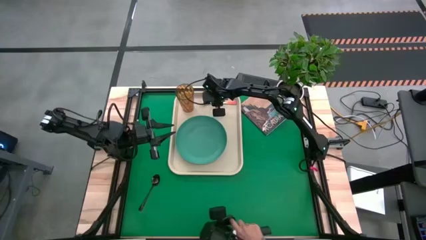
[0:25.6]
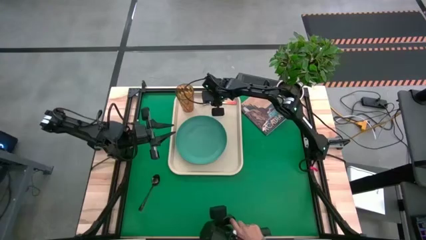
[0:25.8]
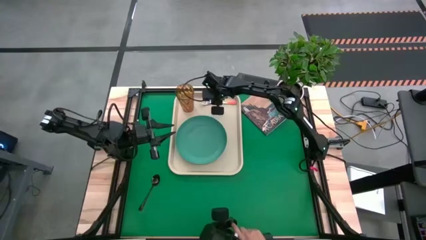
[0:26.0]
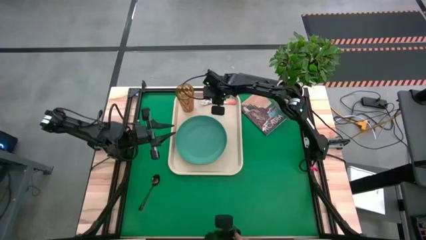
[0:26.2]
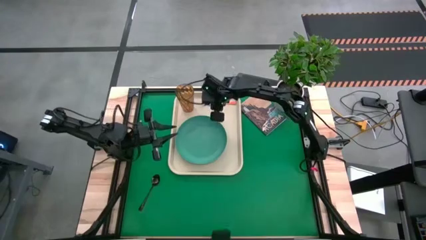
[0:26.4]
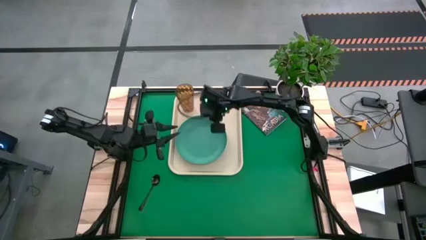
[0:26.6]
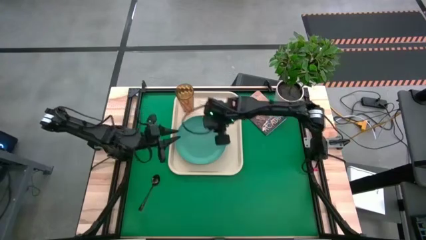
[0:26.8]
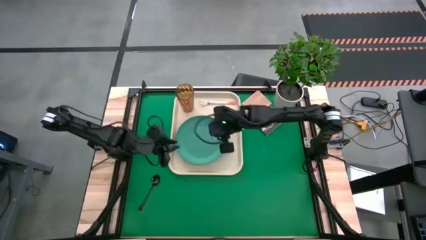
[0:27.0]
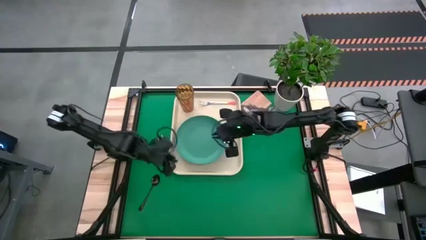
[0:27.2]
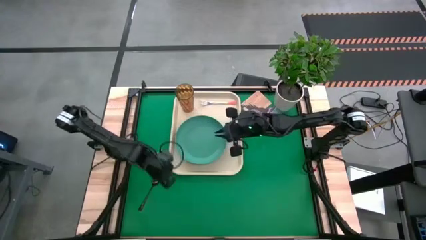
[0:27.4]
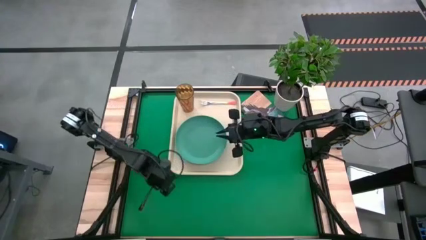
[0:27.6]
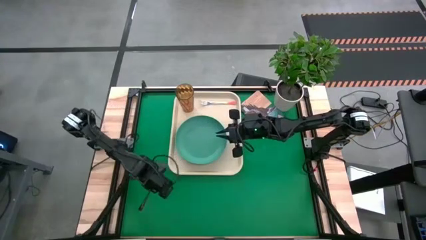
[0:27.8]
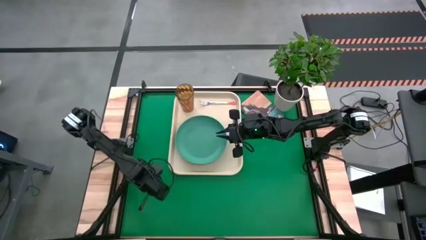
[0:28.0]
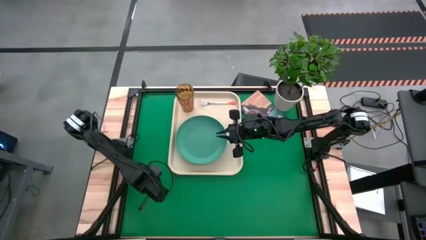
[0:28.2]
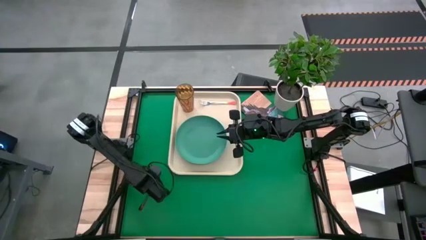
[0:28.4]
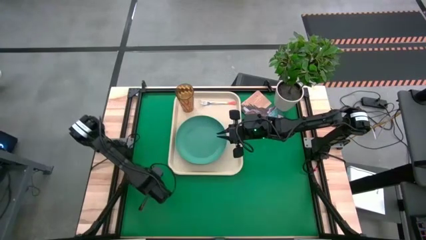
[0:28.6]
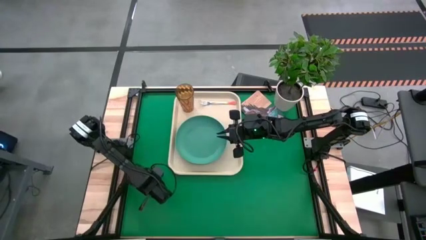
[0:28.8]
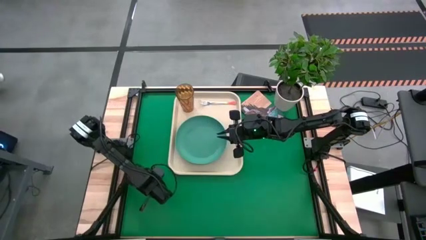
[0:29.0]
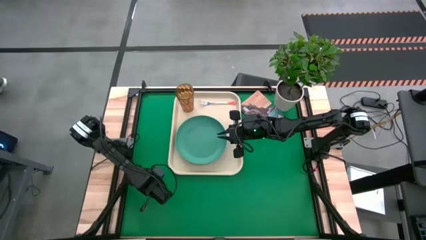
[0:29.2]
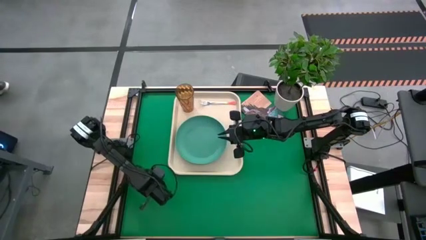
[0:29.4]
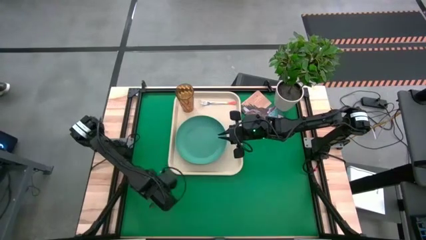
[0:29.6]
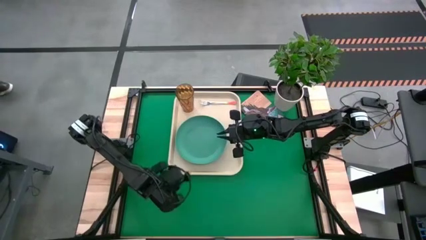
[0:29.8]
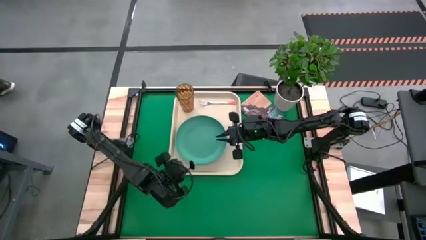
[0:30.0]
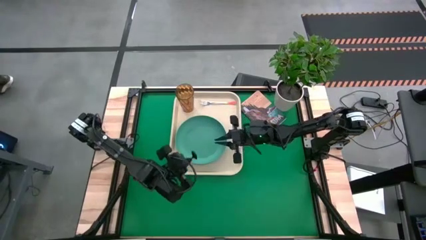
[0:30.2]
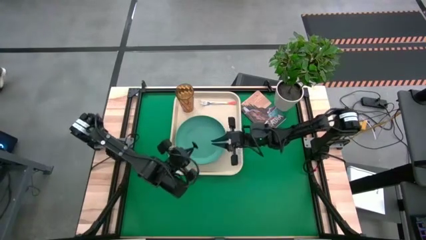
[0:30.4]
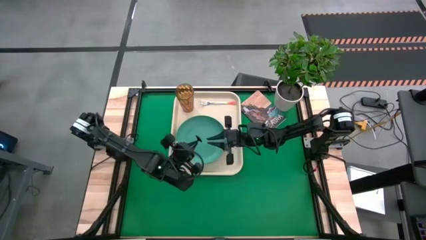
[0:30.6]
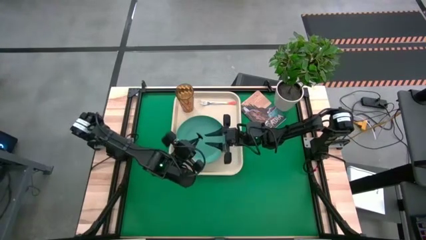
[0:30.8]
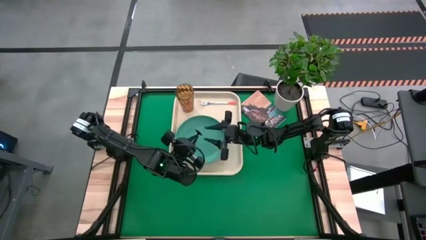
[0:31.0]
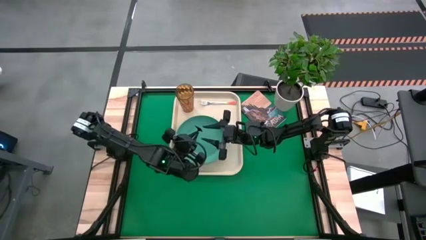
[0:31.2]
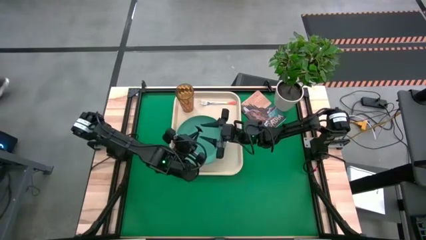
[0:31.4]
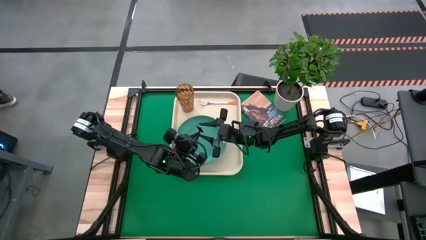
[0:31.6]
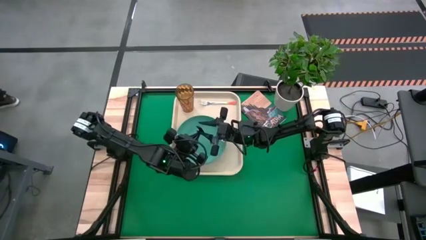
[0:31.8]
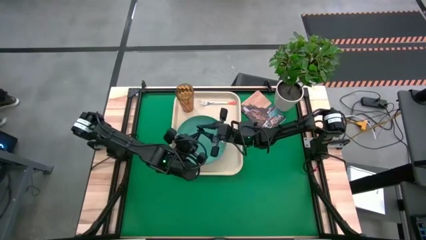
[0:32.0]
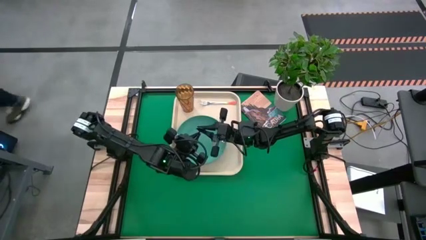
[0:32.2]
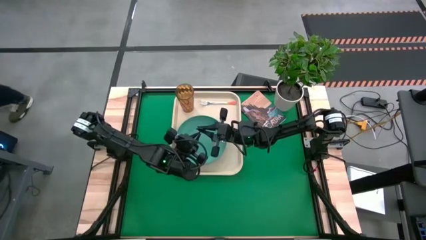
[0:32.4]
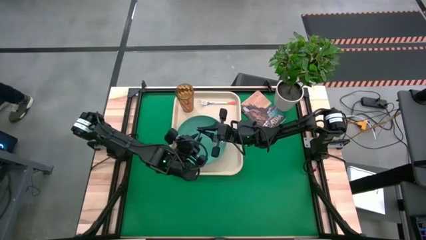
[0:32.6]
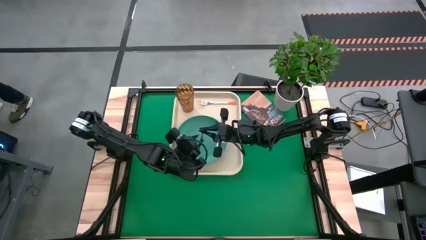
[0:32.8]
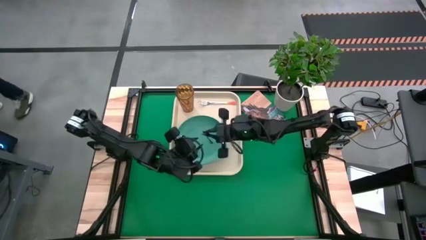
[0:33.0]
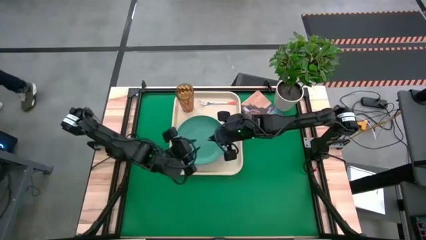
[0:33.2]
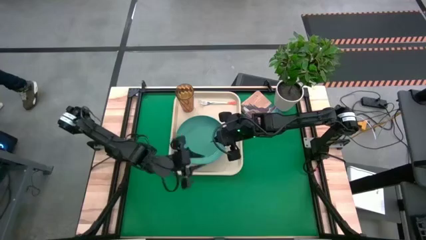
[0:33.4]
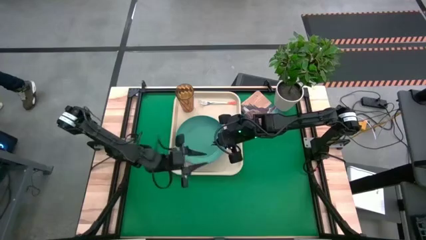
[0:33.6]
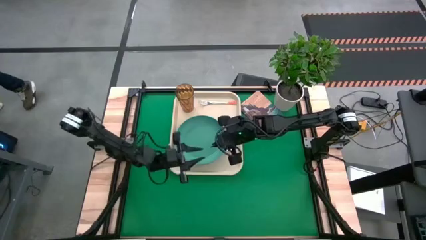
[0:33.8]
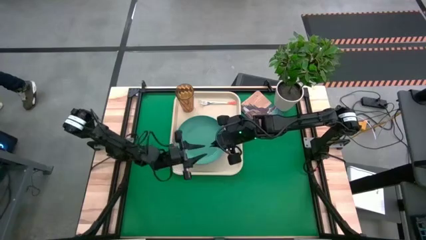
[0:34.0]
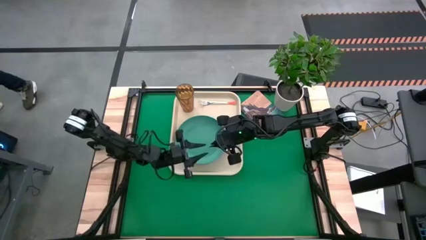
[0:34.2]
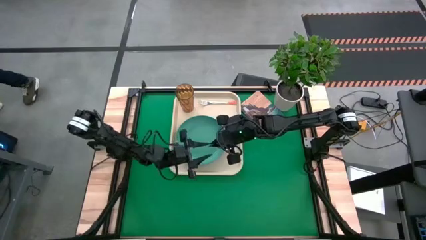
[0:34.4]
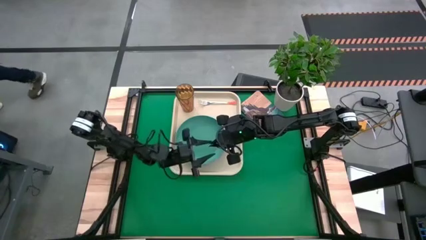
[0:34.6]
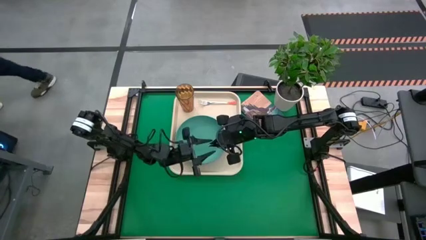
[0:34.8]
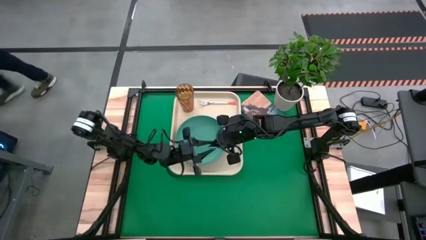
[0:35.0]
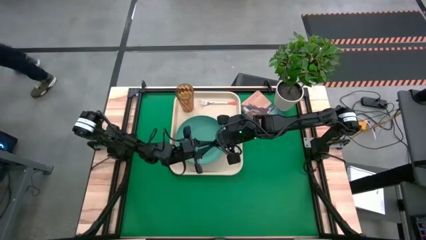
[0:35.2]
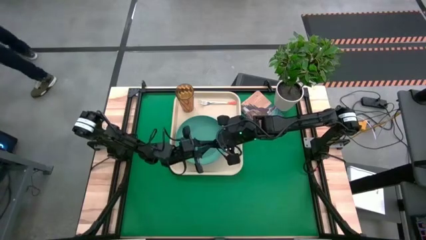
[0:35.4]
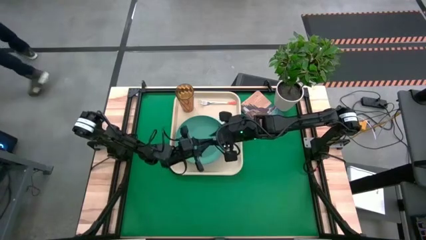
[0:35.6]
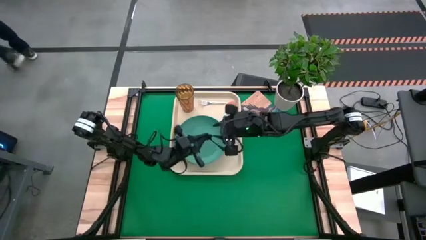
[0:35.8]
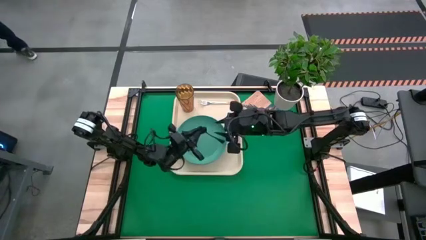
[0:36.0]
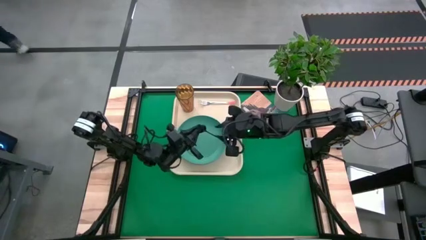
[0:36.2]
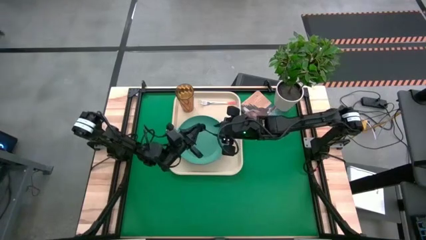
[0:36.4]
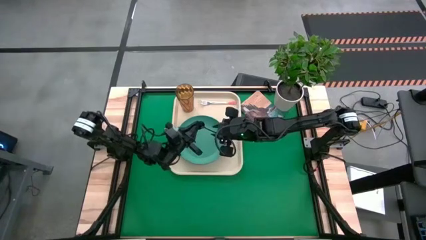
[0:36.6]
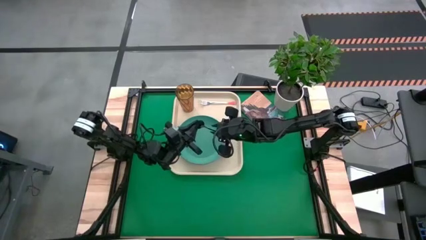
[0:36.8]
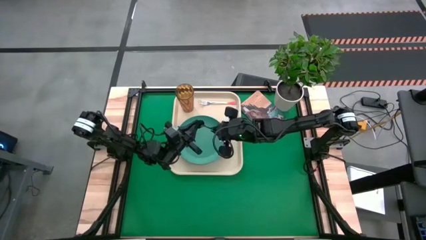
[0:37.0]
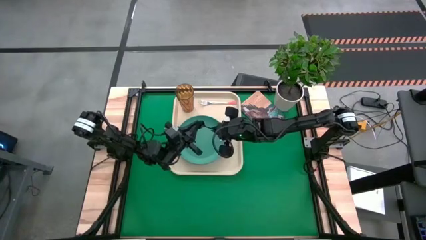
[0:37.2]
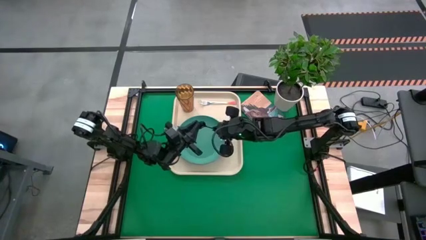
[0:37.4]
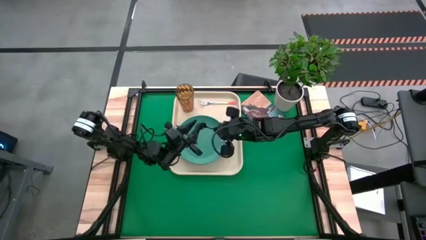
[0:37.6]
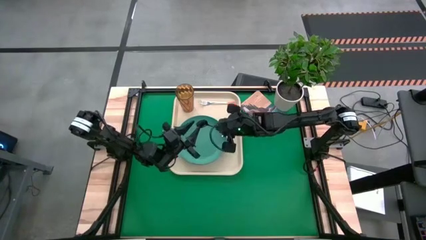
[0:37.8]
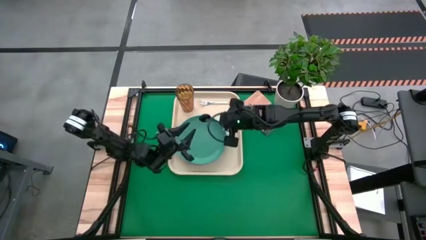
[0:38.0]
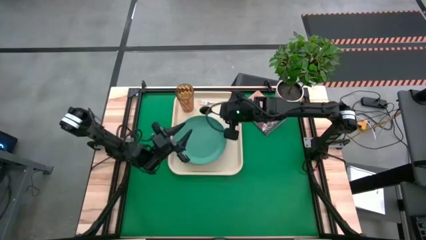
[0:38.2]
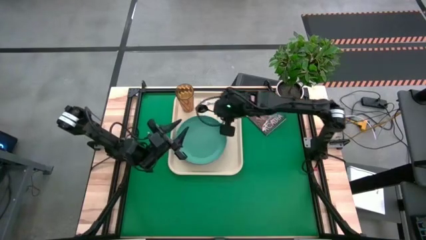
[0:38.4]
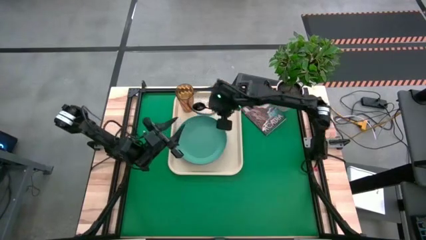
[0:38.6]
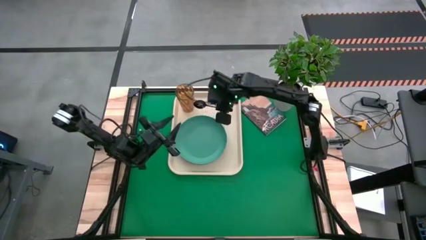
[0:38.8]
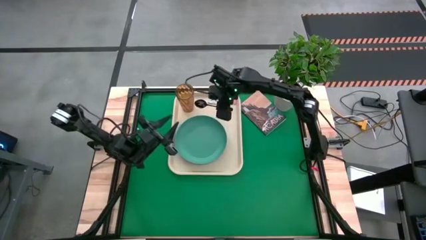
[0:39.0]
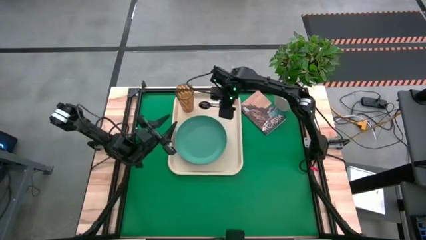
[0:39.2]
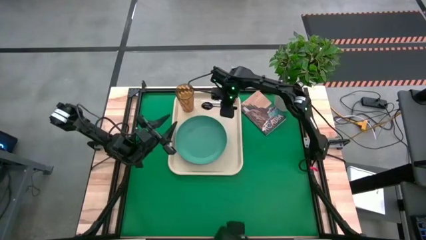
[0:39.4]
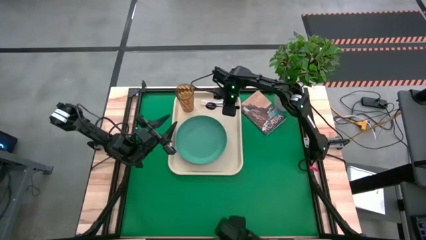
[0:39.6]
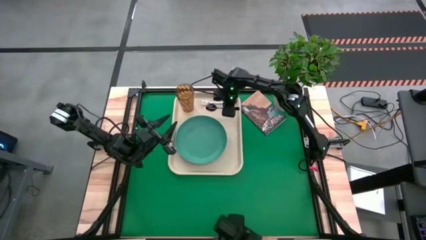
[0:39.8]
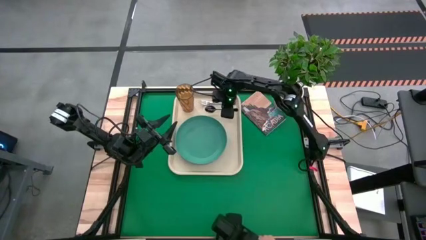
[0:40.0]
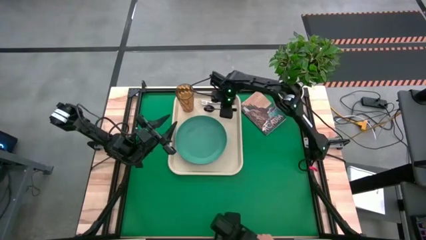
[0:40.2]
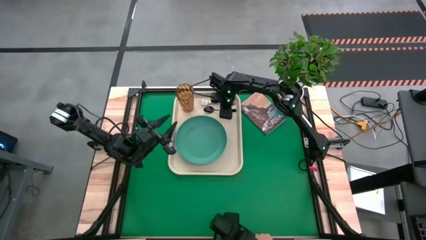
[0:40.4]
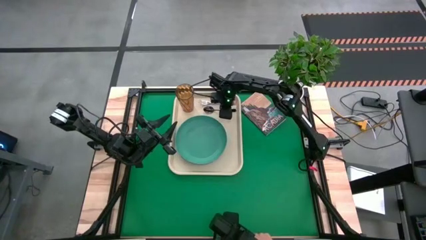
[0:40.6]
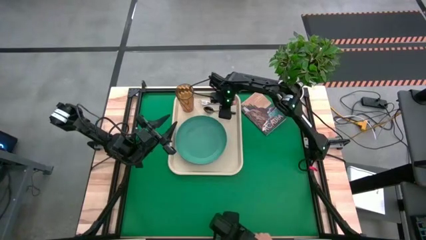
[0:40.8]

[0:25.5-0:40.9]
Task: Pick and place plate/cup/fork/spoon on tray
Put the black spoon on the white tray to the top right of the green plate
